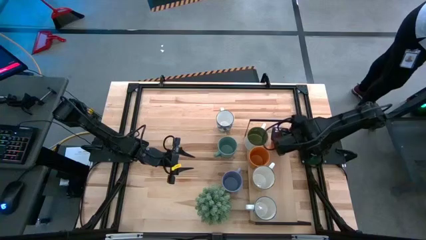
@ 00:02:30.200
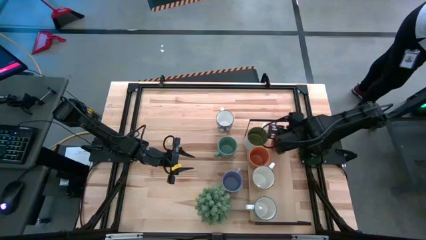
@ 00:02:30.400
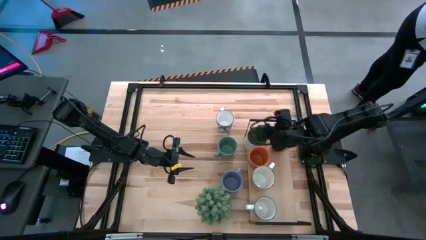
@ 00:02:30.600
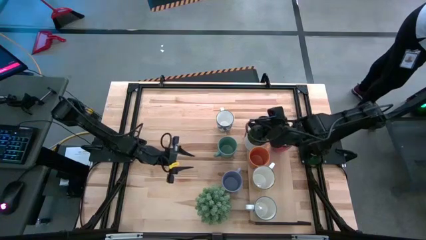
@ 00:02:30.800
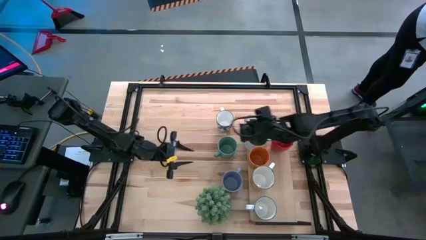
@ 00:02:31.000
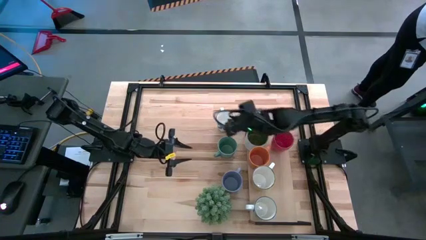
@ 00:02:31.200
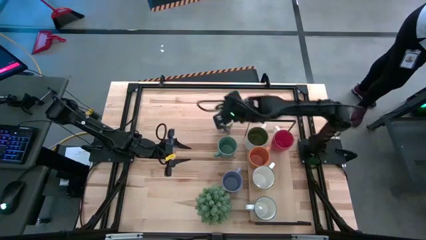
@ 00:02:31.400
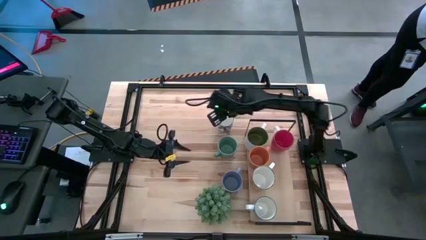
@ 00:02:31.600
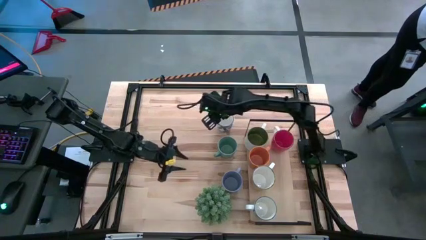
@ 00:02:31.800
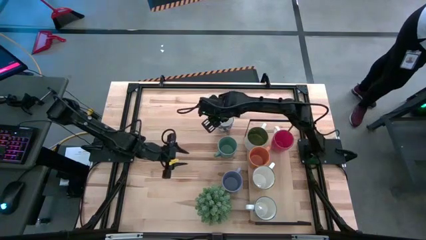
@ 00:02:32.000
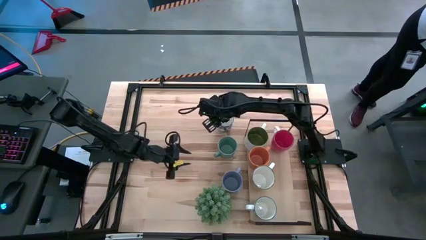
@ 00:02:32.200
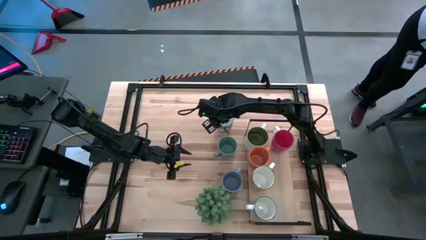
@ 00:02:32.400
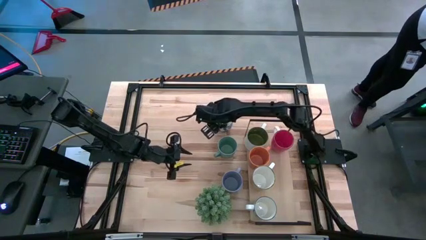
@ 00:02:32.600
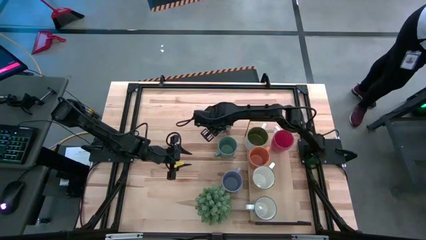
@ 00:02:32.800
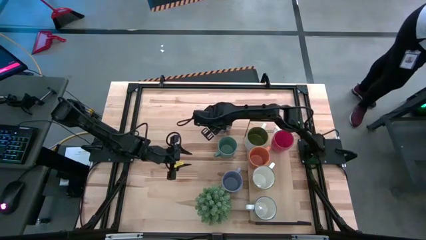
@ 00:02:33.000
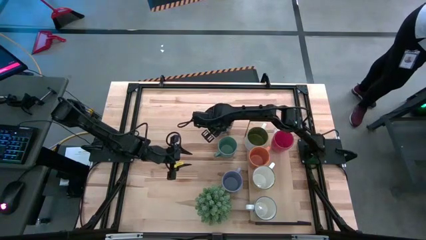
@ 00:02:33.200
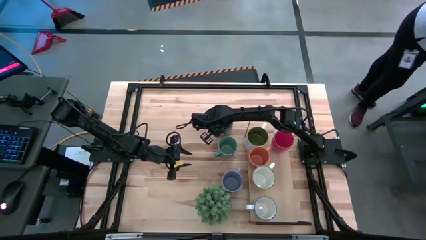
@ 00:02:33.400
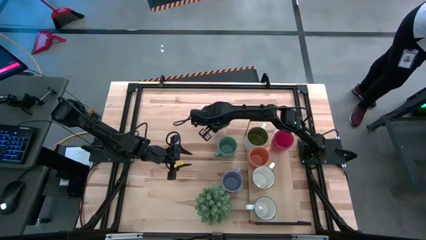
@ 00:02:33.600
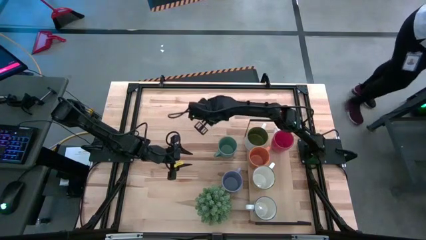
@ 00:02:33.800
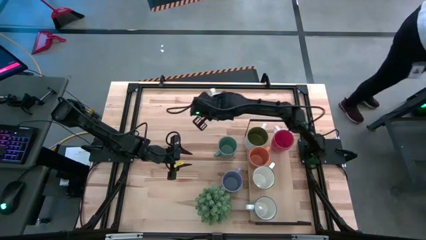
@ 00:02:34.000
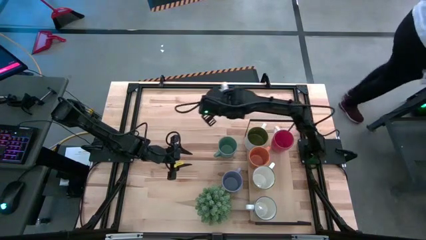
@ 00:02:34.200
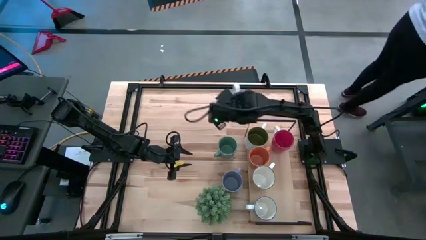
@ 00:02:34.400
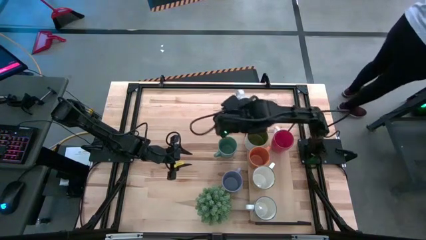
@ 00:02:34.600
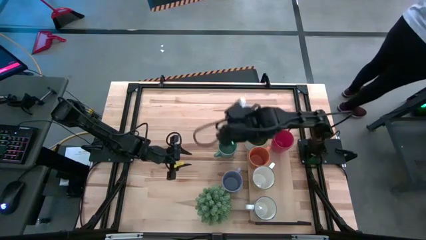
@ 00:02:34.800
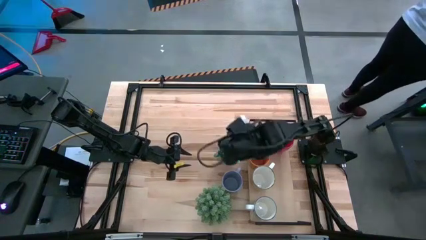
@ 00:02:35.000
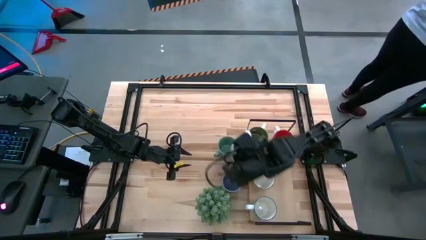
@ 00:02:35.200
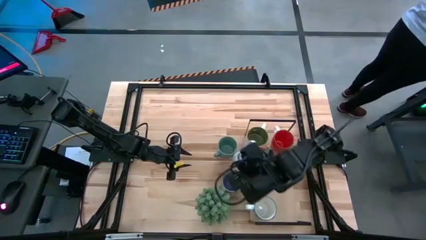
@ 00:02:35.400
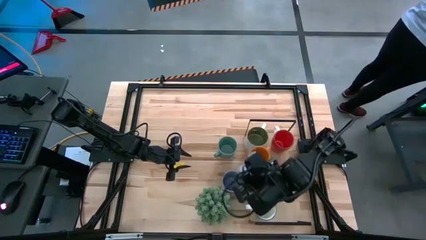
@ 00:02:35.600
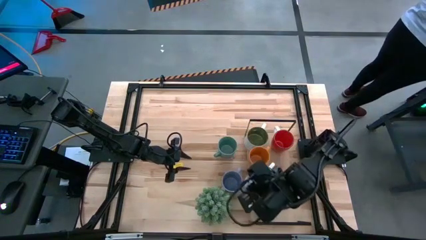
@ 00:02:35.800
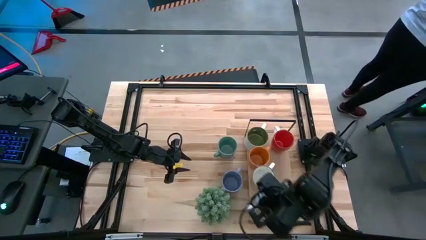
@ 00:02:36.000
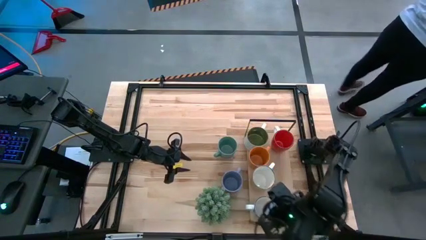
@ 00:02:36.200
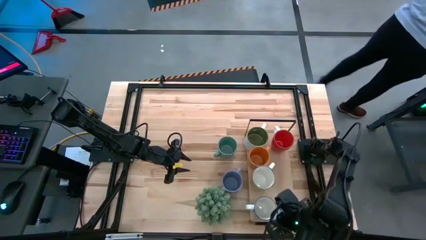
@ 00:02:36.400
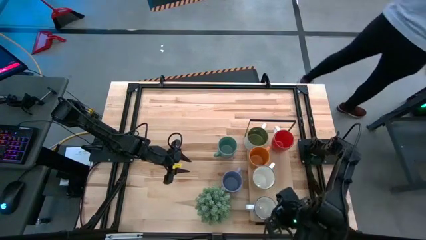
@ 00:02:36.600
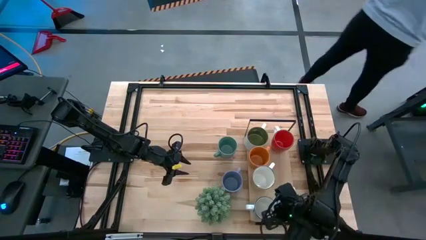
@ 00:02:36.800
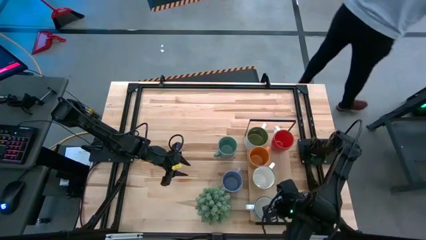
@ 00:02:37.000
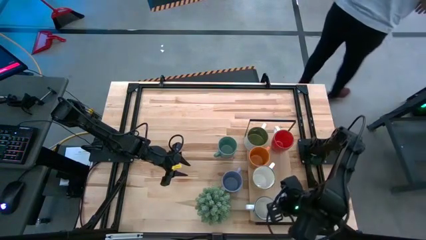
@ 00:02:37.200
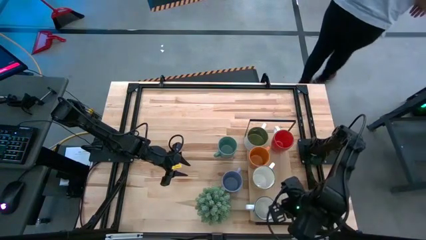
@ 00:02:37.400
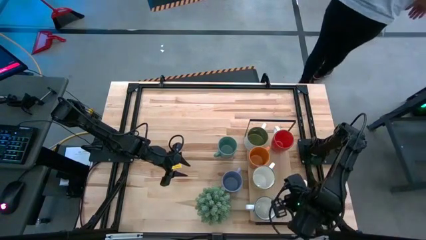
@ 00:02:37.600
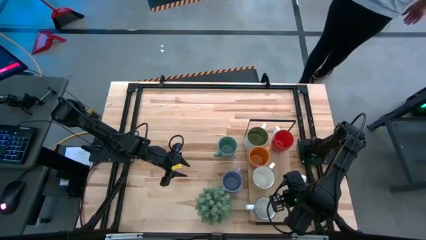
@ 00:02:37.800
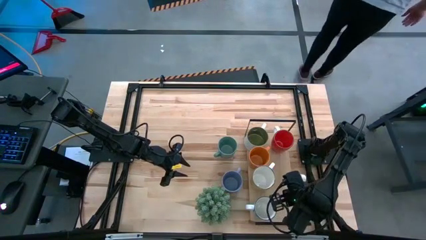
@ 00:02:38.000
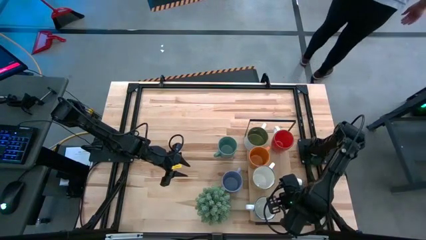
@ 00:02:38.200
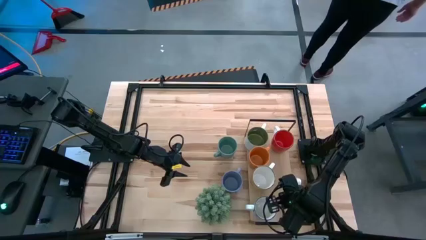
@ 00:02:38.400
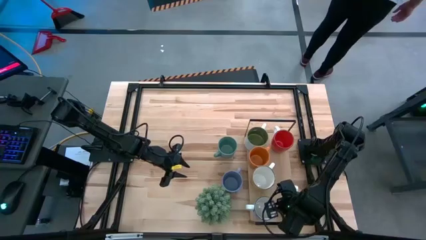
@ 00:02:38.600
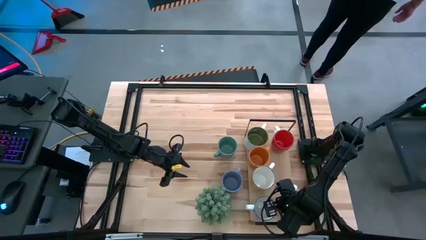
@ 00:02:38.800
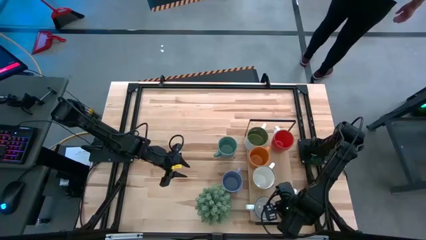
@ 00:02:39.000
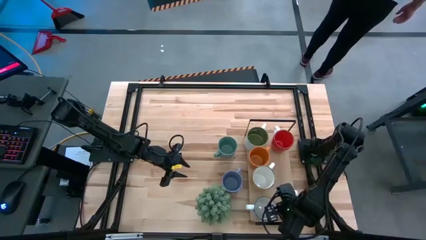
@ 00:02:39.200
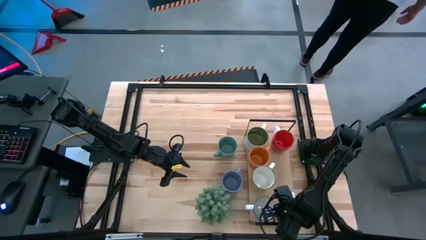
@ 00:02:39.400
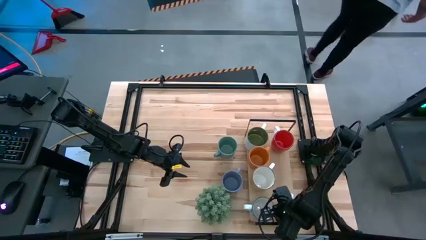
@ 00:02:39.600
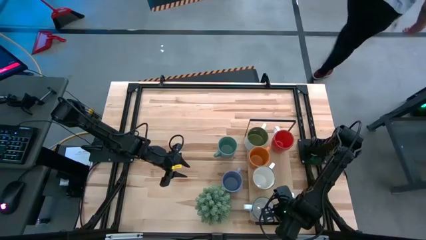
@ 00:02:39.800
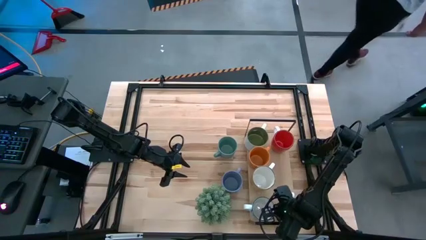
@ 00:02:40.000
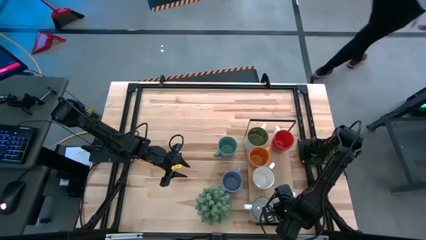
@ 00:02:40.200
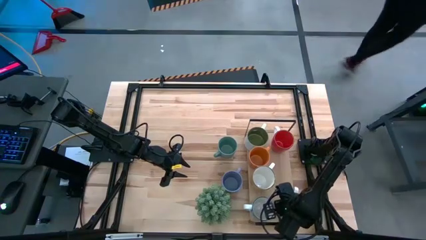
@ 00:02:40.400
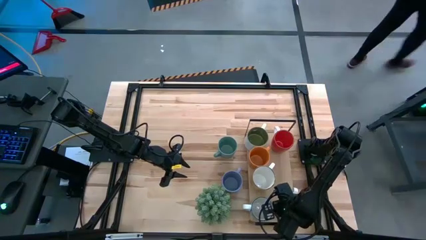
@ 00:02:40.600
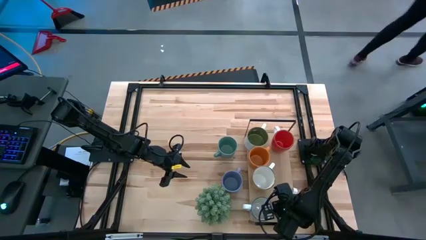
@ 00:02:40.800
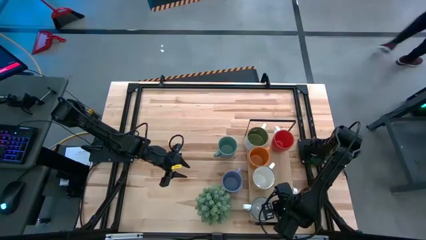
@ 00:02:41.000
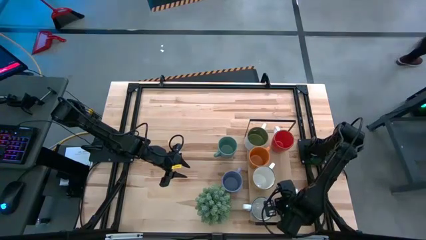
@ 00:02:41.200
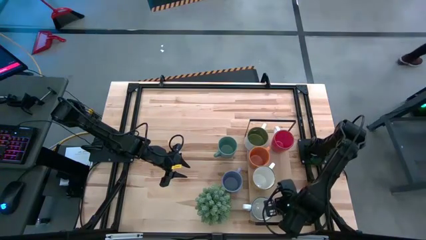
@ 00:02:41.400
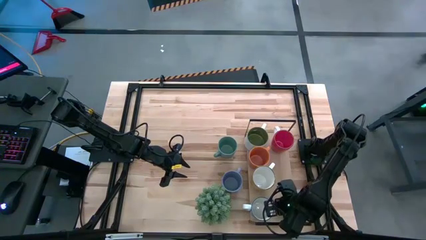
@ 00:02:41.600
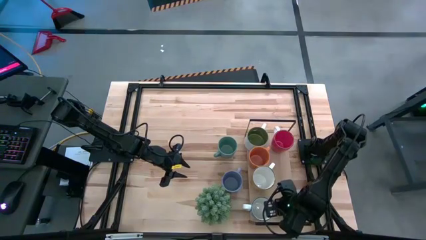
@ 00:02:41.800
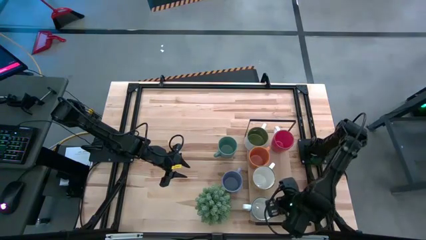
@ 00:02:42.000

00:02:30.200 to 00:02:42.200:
Task: Place coffee mugs
Put the blue mug on the shelf

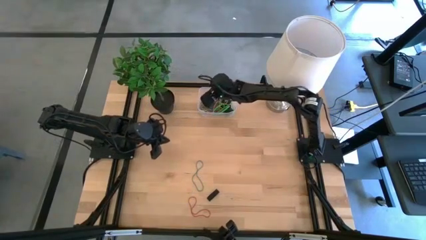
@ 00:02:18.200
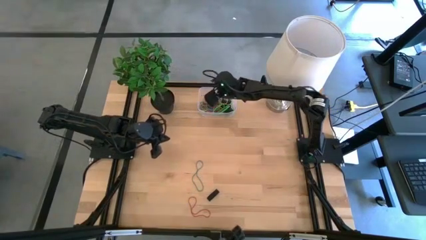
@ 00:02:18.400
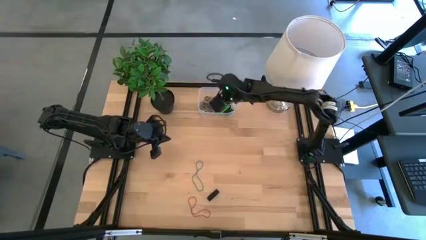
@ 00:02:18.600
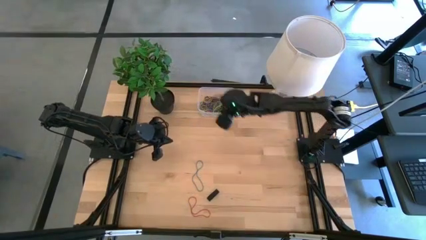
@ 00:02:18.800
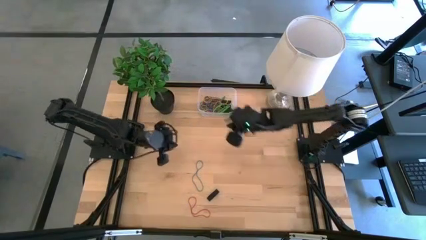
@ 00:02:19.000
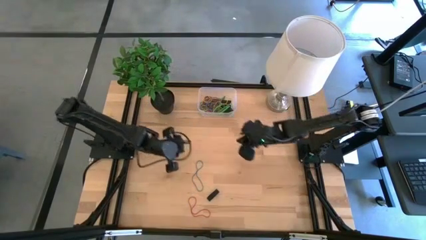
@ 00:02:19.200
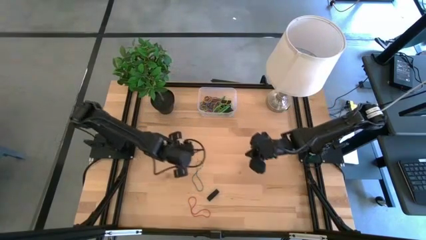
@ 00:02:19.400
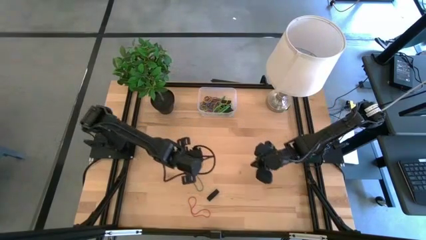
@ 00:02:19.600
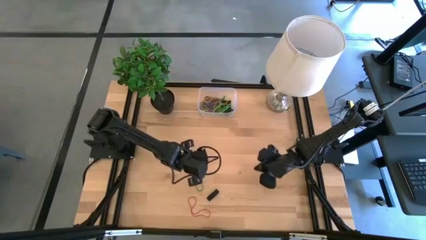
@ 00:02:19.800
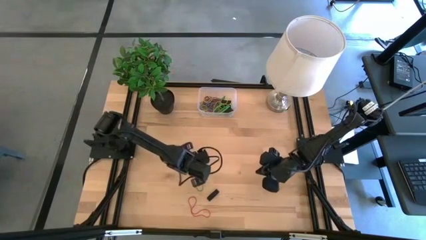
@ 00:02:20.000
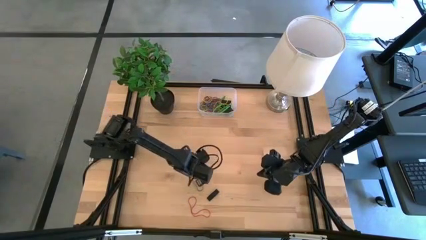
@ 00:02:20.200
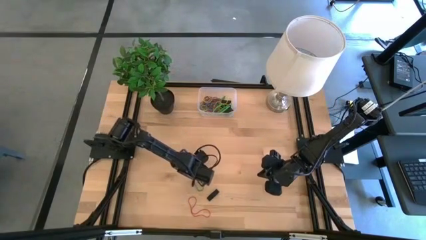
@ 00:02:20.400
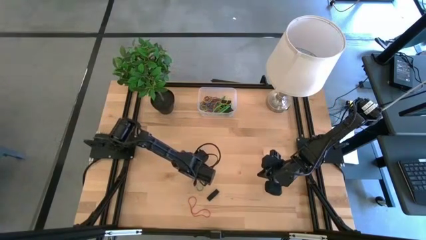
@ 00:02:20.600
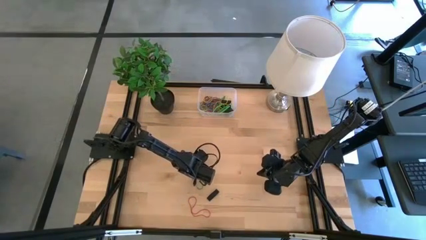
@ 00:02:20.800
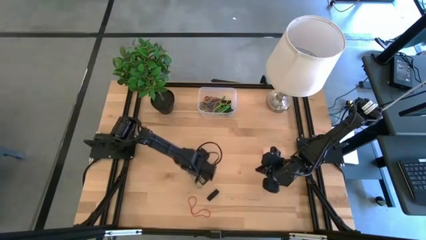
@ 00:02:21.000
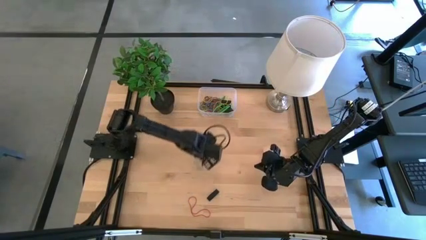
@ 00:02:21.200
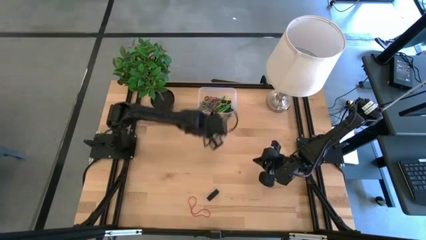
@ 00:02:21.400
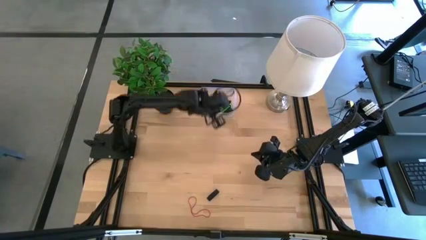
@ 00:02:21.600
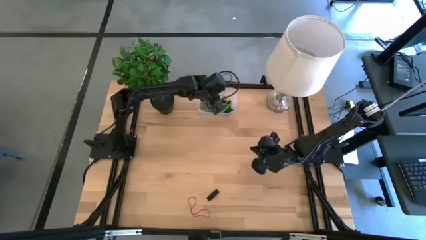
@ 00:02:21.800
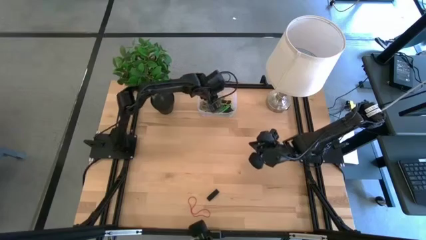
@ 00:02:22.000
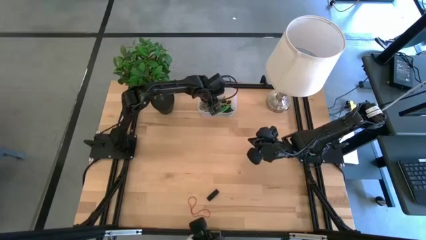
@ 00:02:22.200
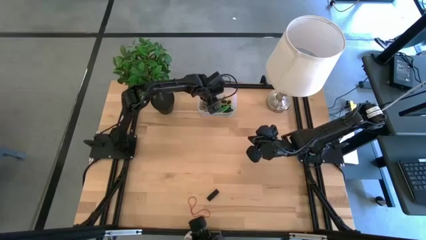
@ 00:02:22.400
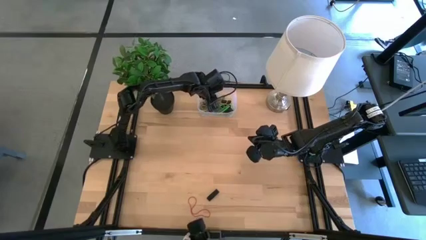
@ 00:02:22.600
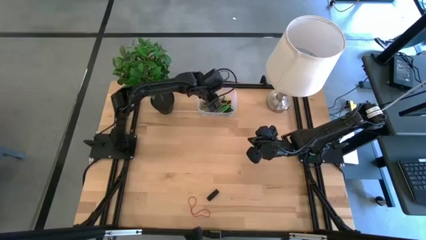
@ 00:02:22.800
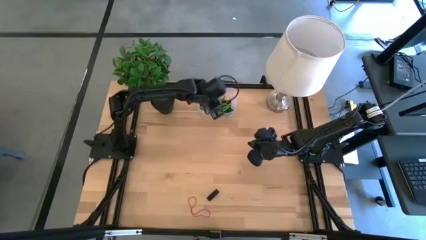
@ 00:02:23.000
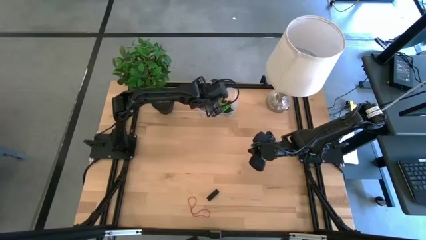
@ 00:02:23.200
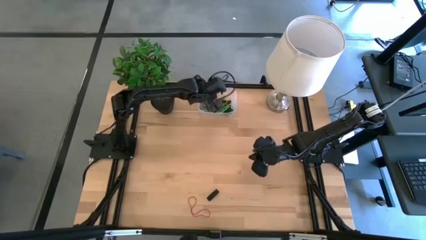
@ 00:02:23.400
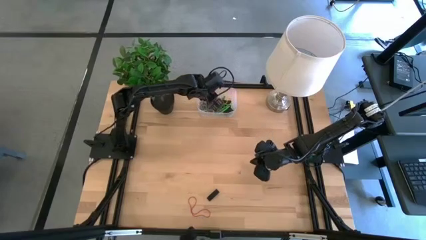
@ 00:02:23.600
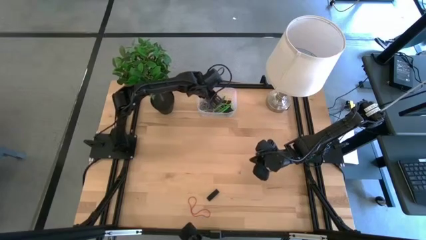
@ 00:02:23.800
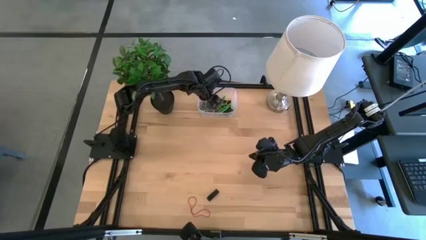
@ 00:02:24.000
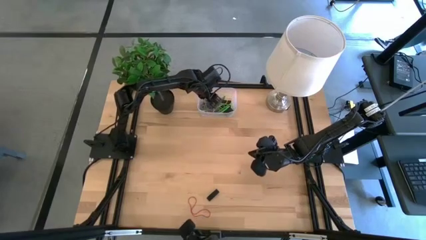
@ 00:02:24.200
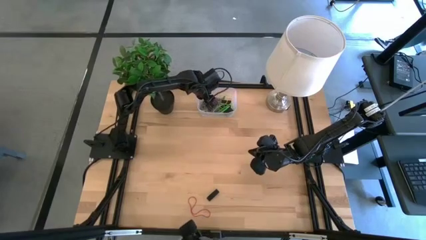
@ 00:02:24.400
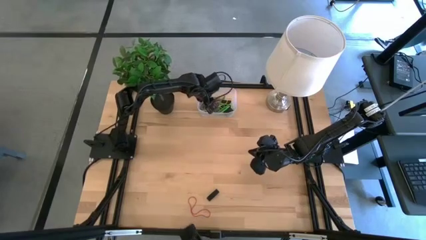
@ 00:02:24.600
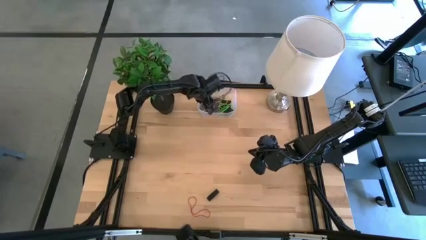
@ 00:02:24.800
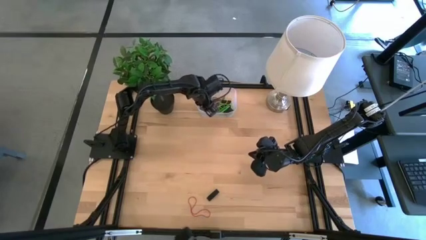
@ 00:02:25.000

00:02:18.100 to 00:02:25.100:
Task: Pick and place rubber bands into bin
Put the blue rubber band into the transparent bin
